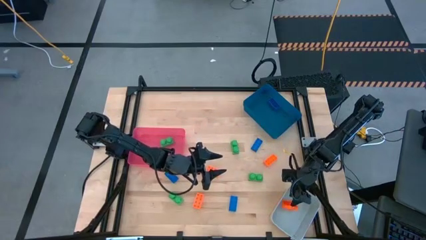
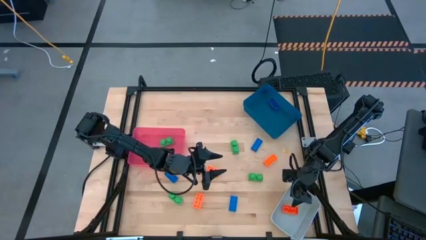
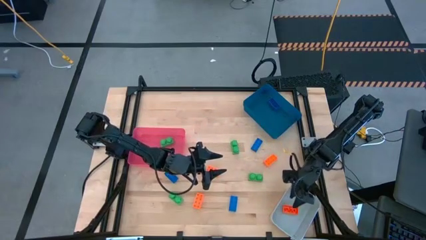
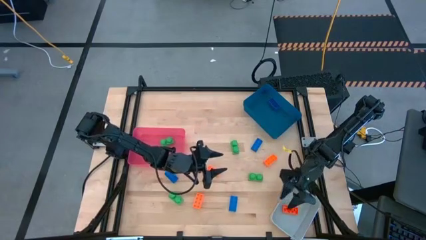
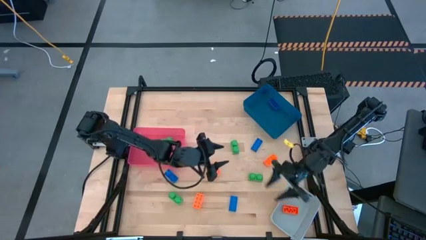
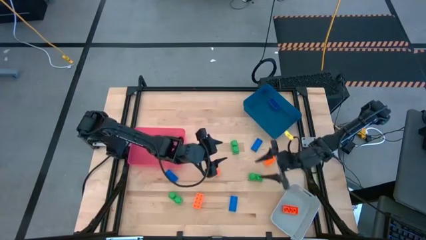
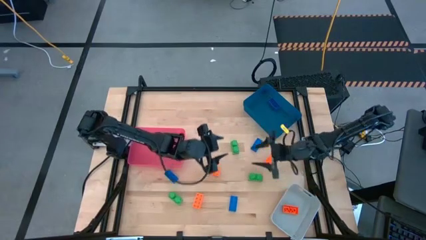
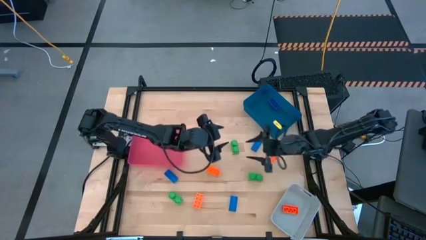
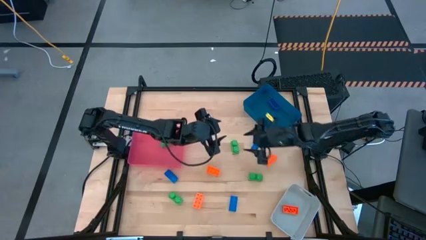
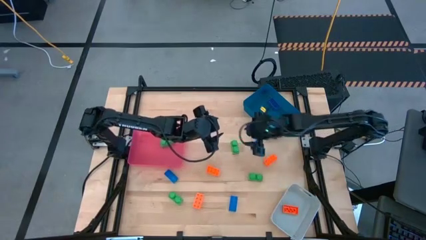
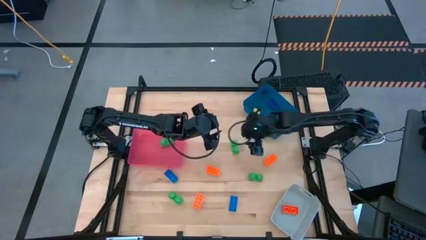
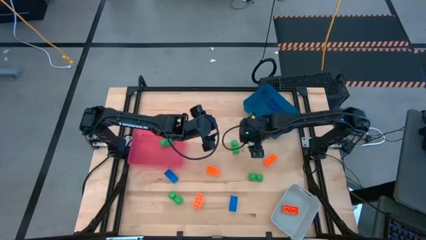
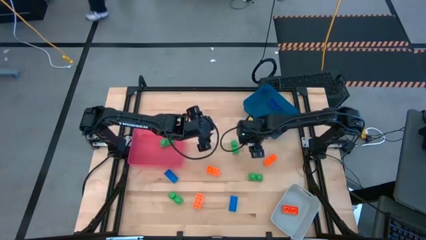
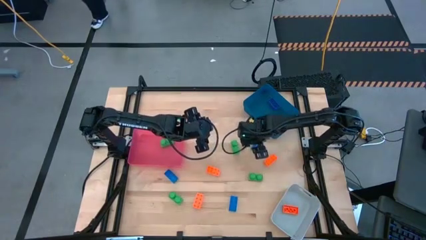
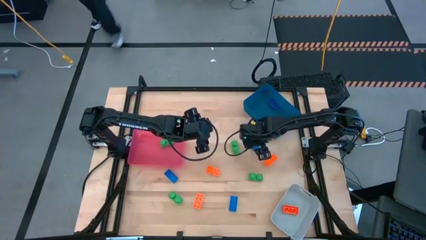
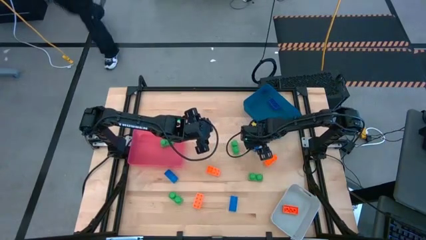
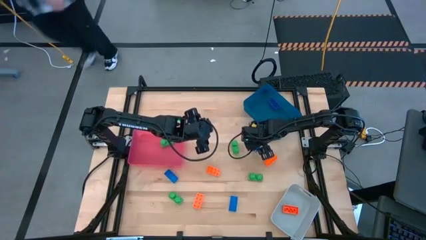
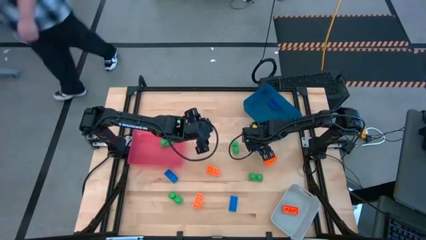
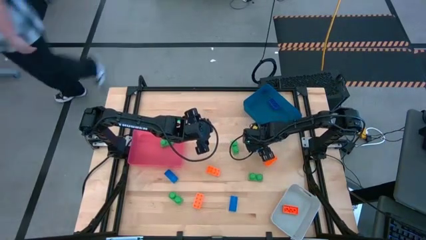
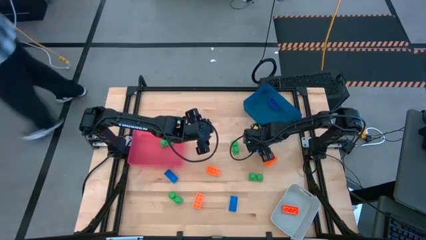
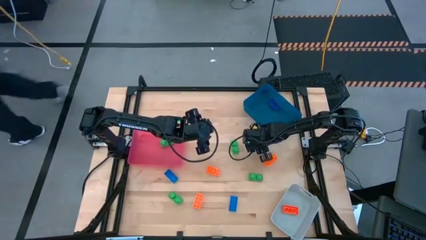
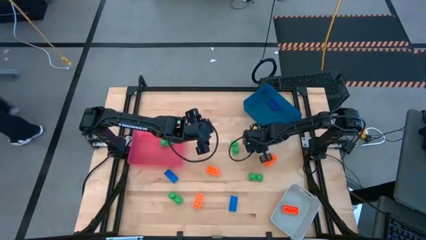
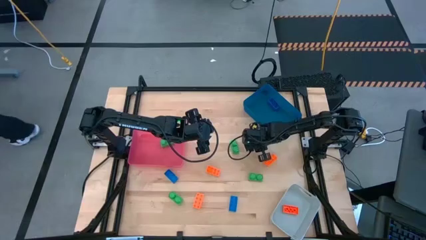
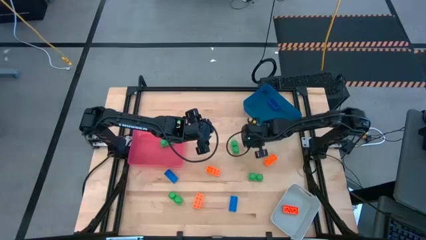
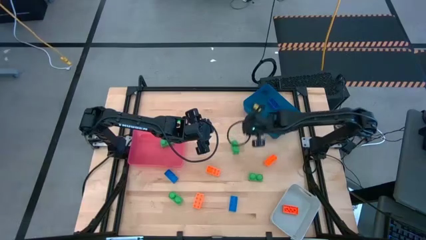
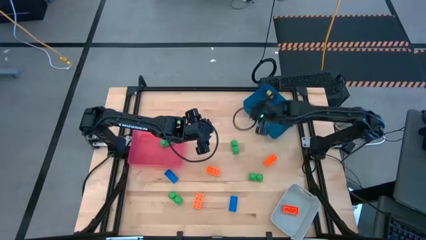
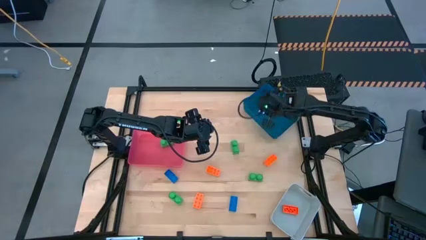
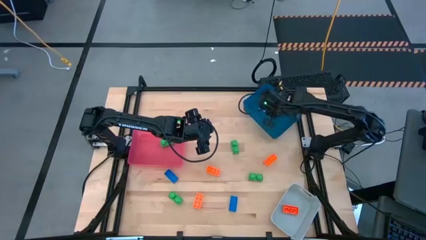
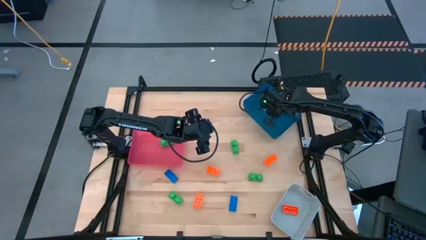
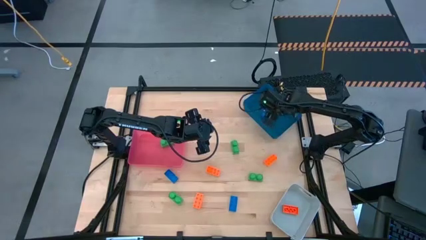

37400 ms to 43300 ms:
Task: Sort & place blocks by color
Put the blue game piece into the blue bin

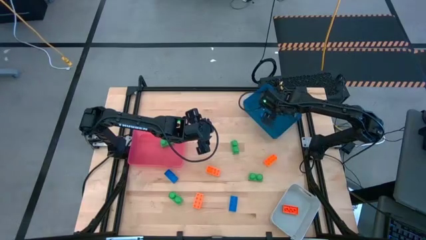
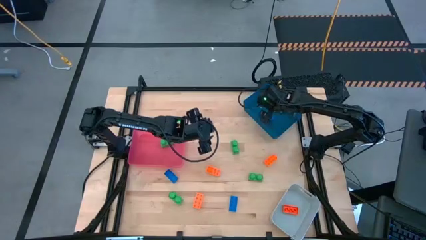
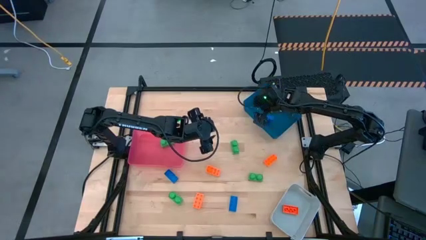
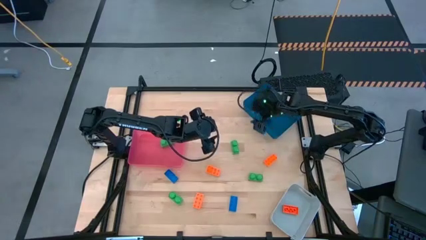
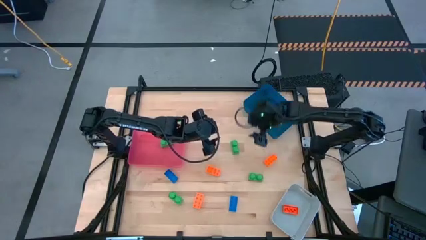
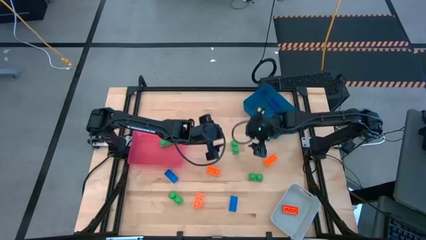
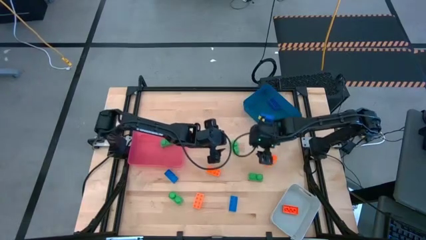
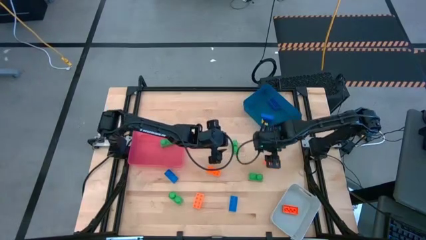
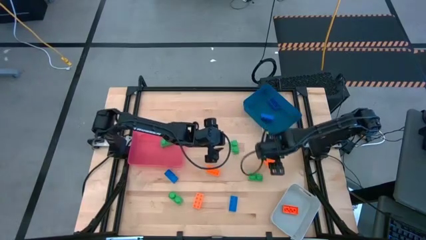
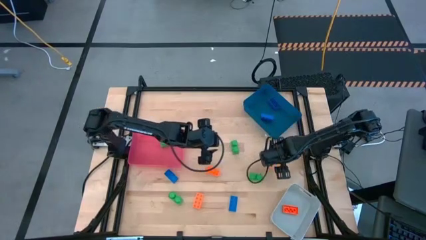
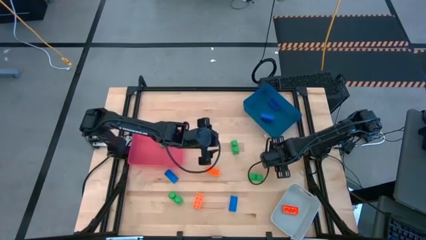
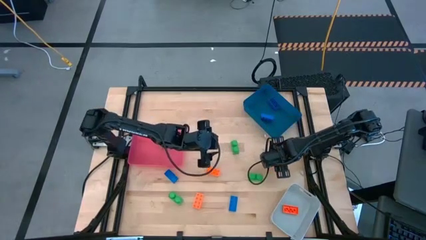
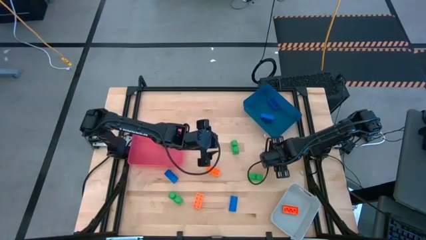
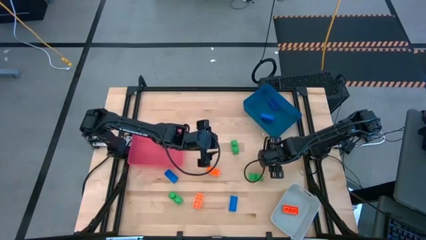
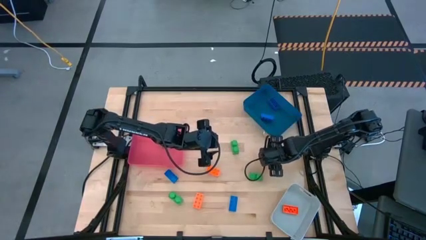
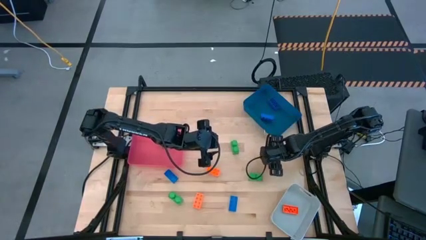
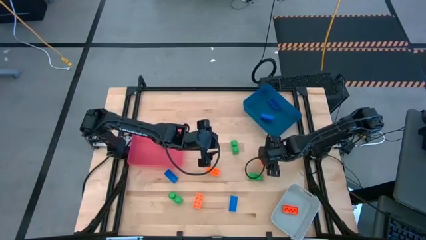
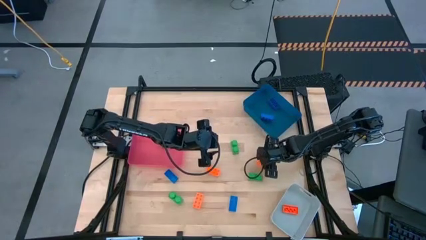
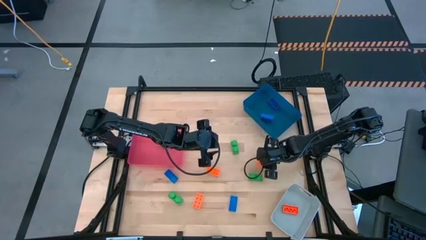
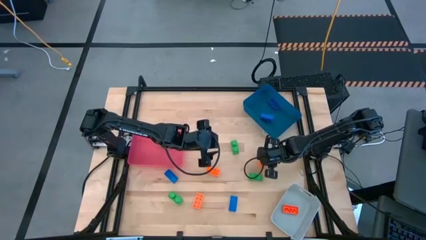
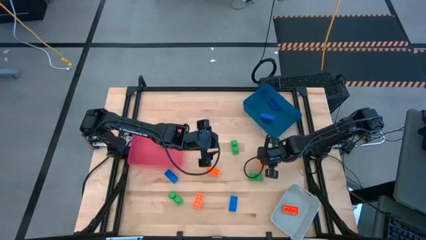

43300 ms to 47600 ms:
Put the orange game piece into the gray bin

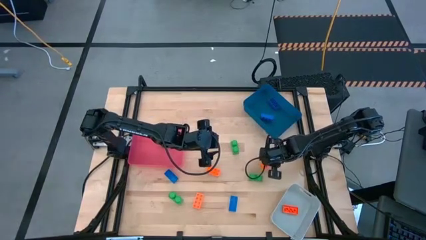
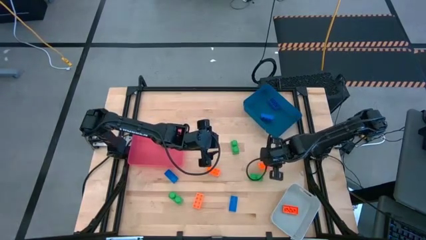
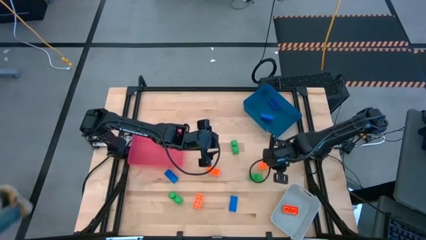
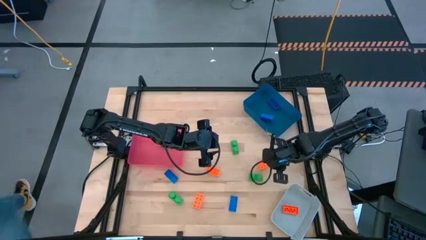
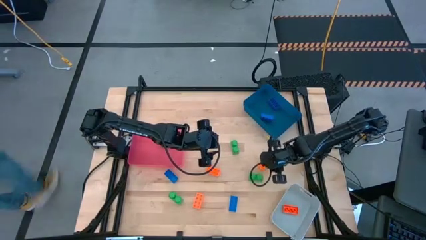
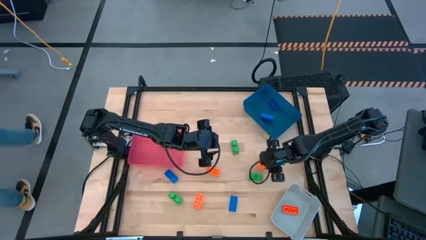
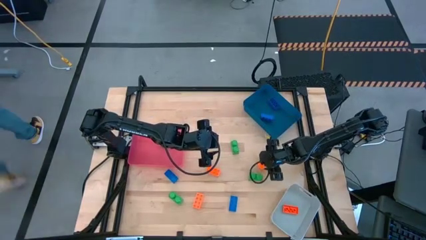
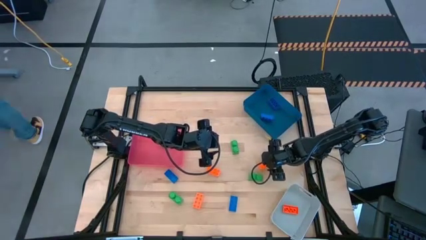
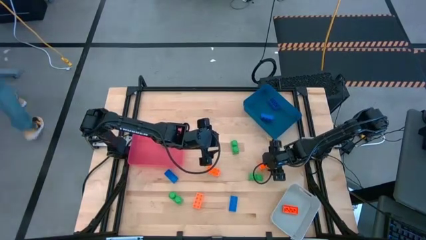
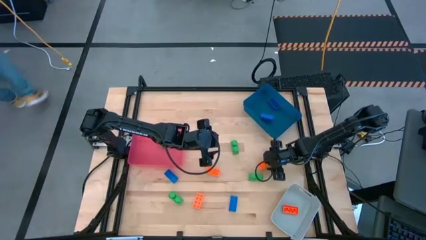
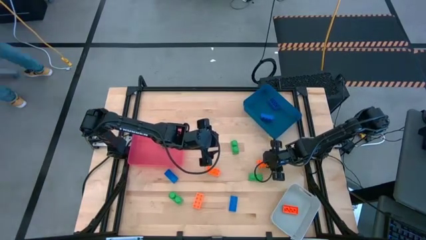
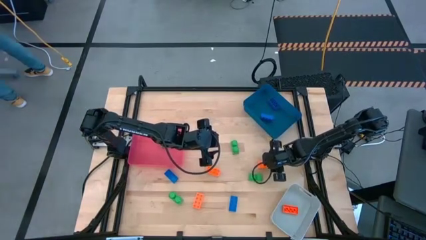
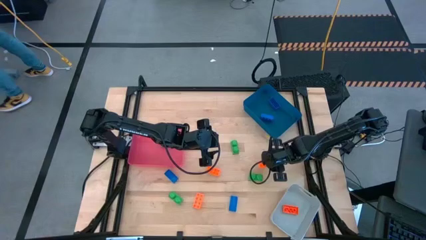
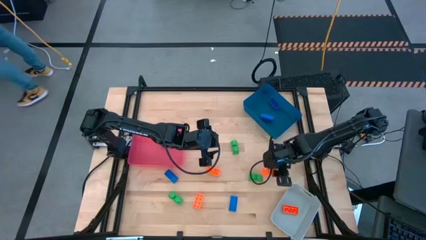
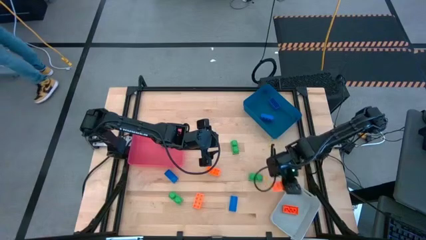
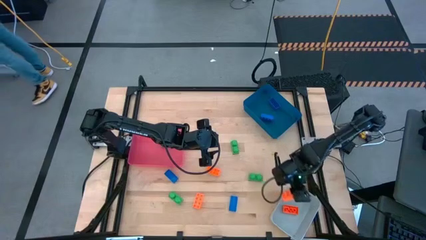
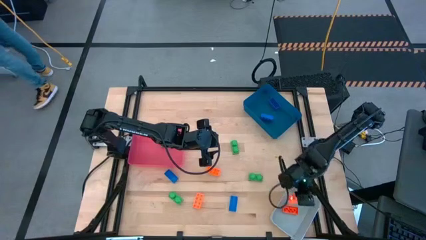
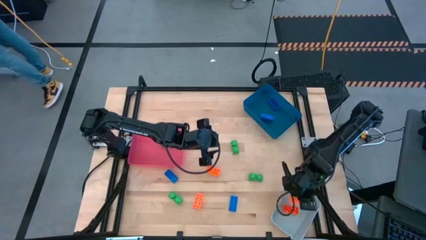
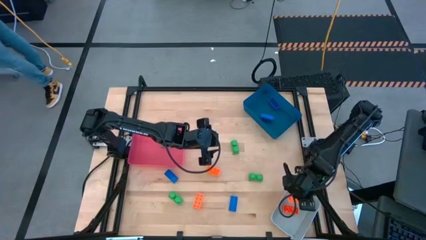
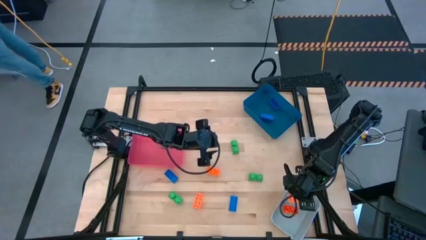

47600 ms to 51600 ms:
Put the orange game piece into the gray bin
